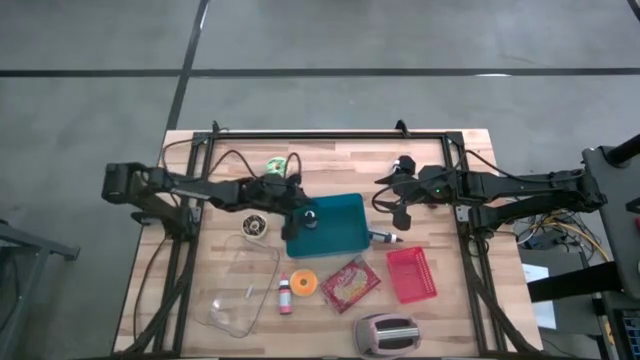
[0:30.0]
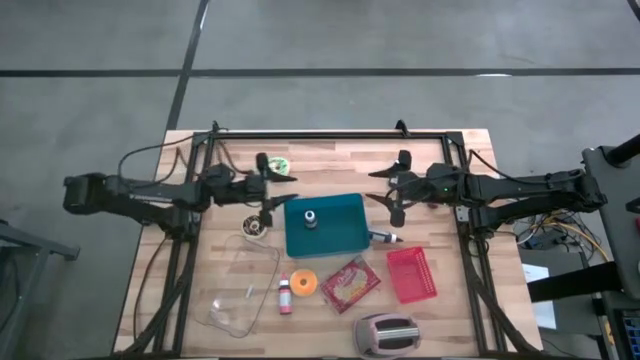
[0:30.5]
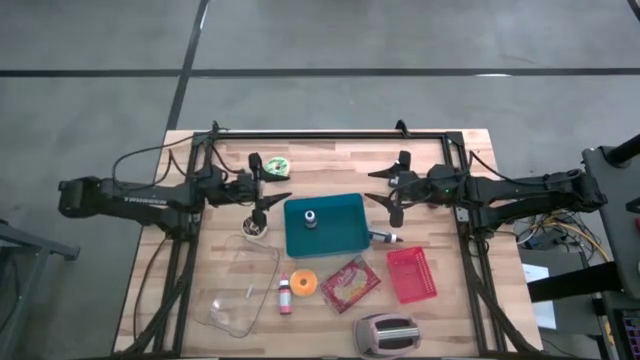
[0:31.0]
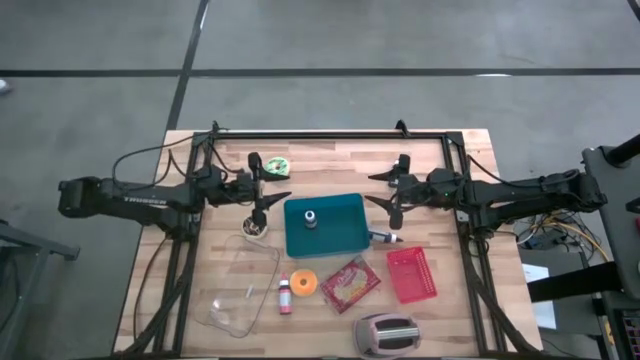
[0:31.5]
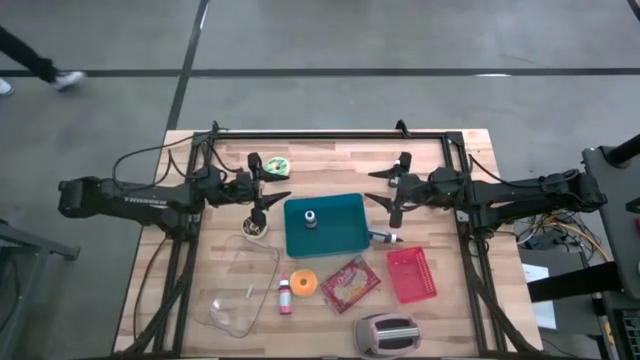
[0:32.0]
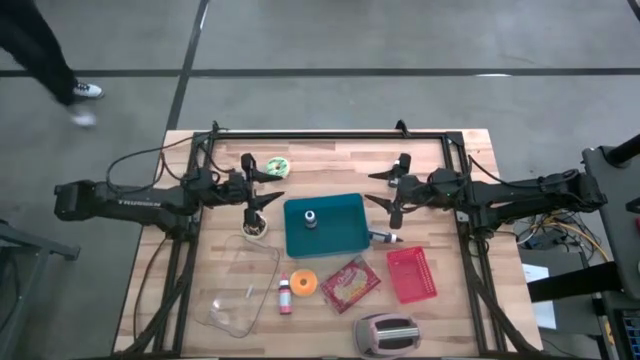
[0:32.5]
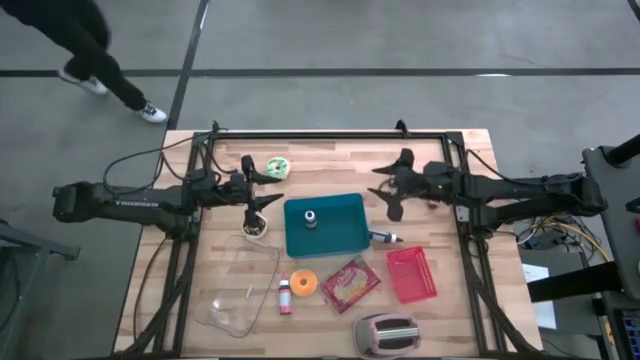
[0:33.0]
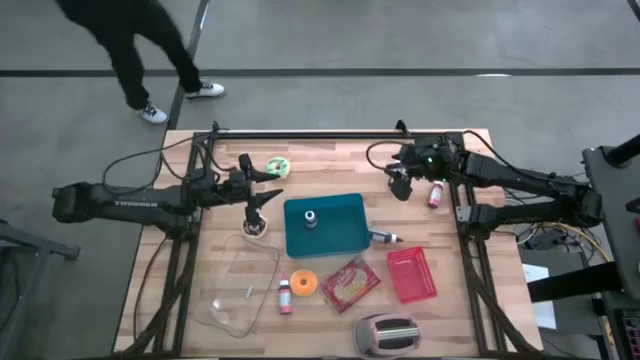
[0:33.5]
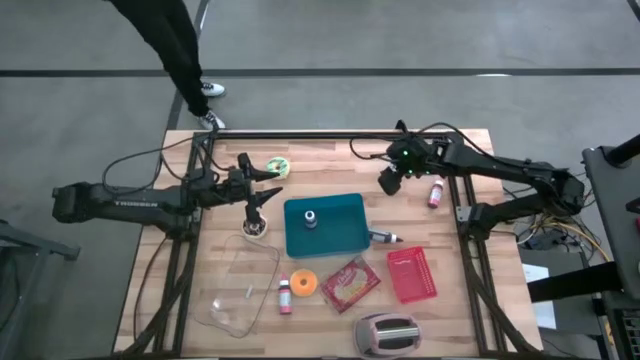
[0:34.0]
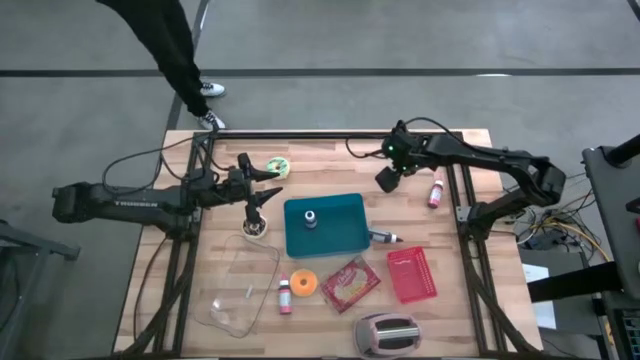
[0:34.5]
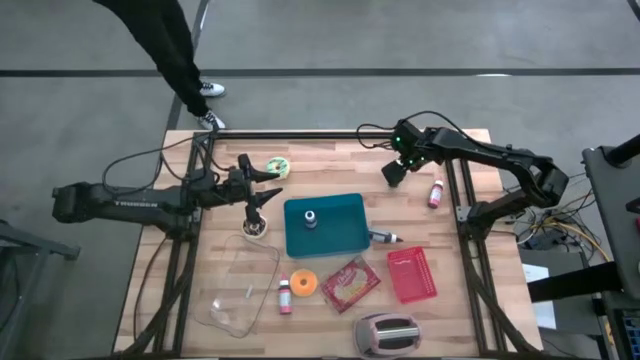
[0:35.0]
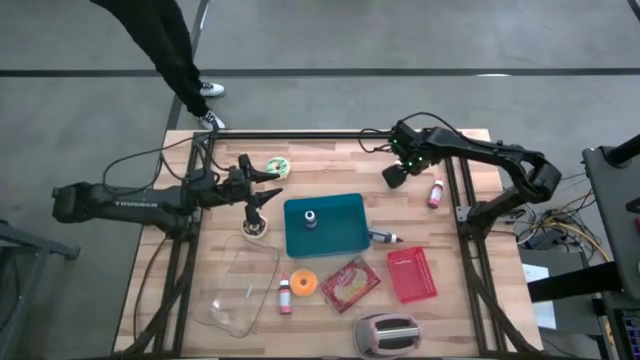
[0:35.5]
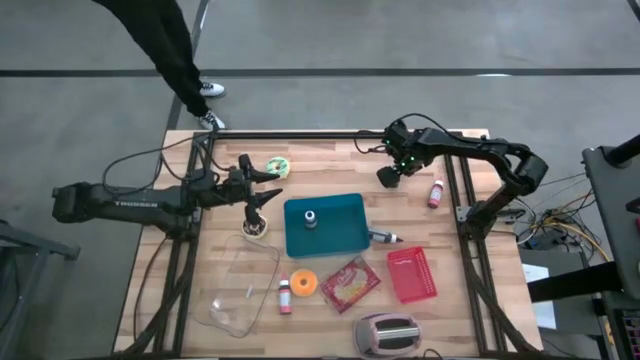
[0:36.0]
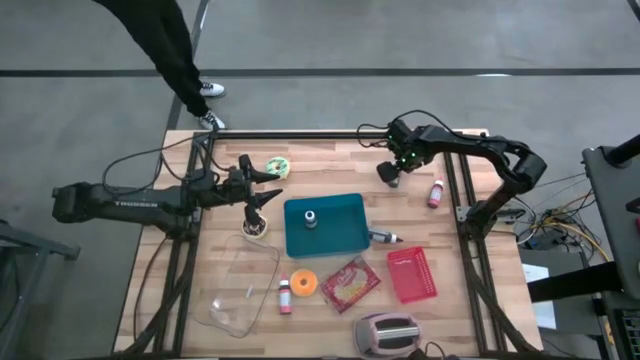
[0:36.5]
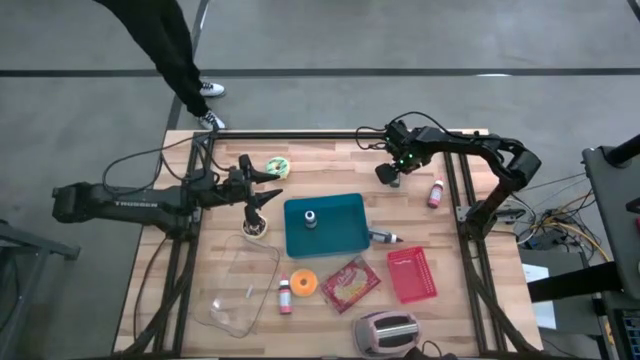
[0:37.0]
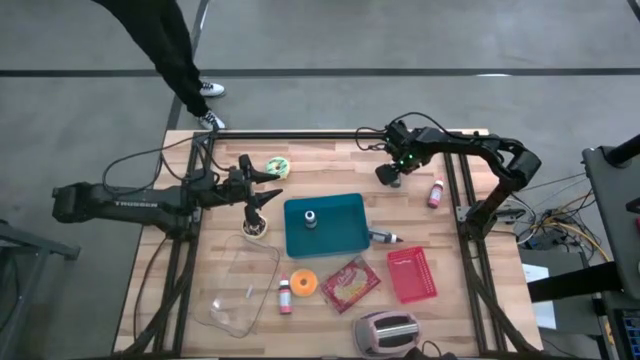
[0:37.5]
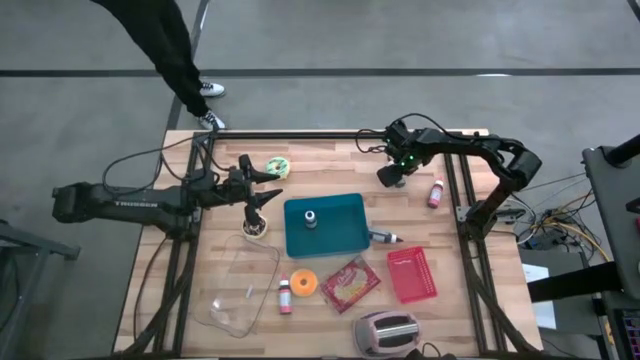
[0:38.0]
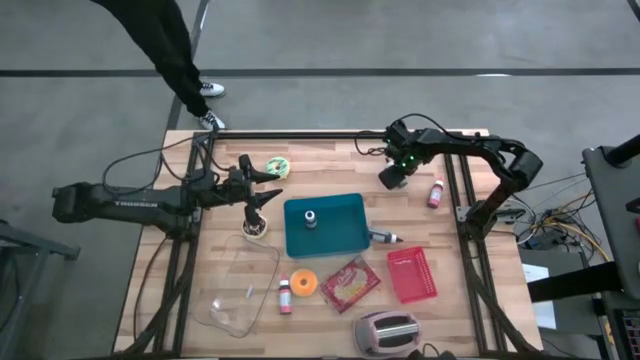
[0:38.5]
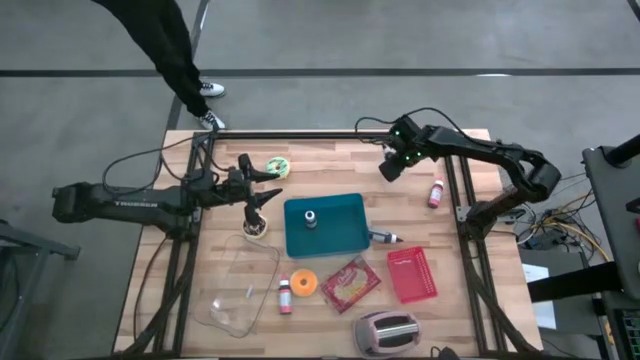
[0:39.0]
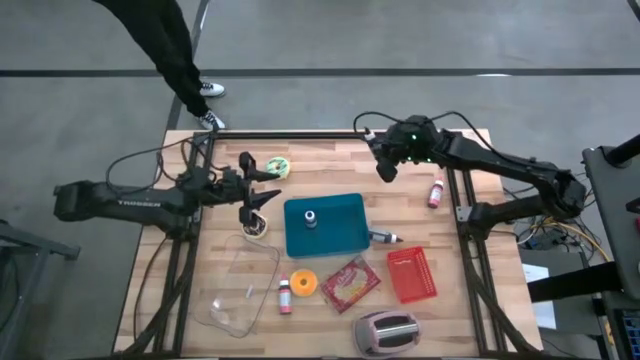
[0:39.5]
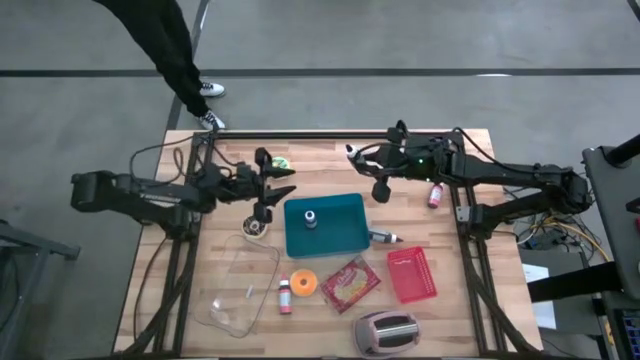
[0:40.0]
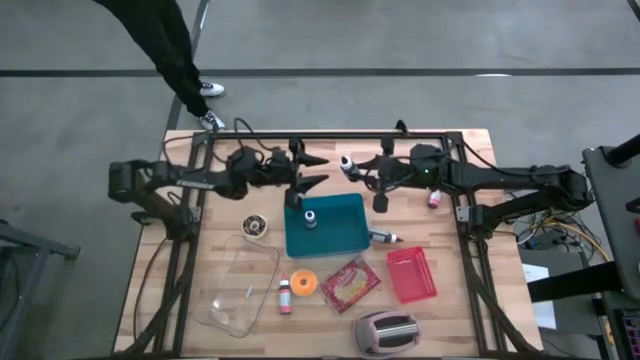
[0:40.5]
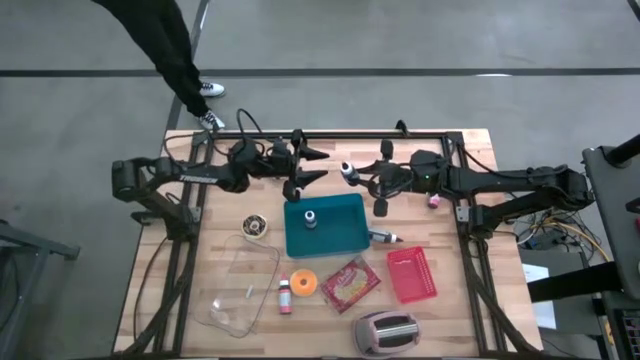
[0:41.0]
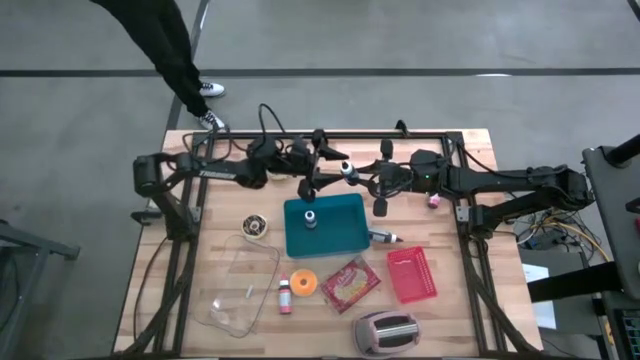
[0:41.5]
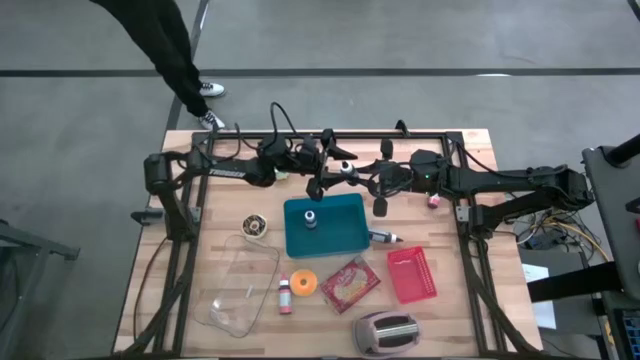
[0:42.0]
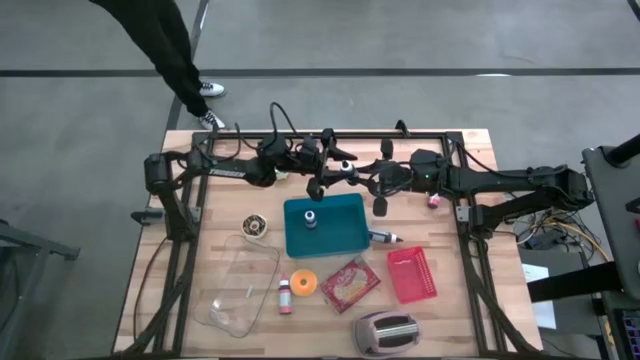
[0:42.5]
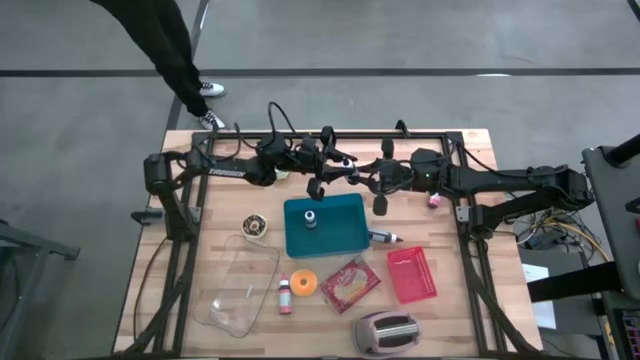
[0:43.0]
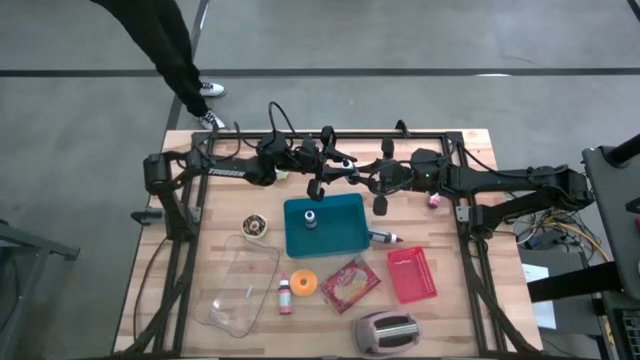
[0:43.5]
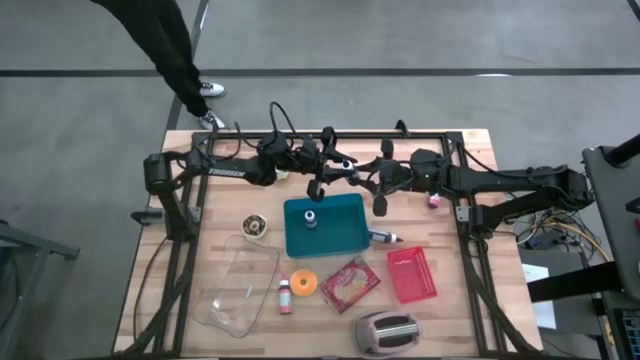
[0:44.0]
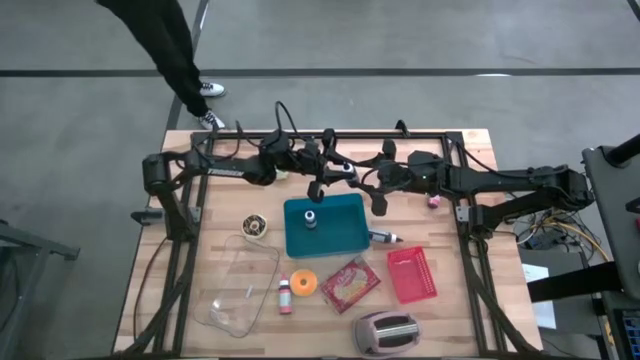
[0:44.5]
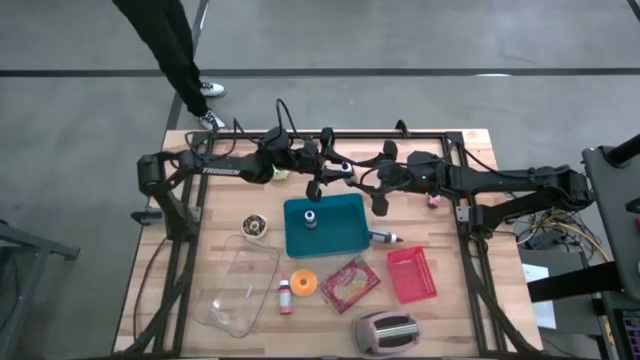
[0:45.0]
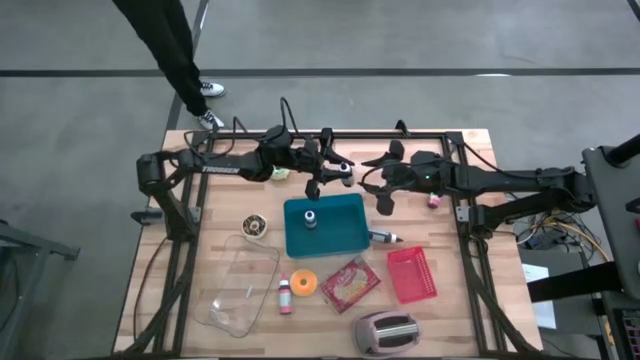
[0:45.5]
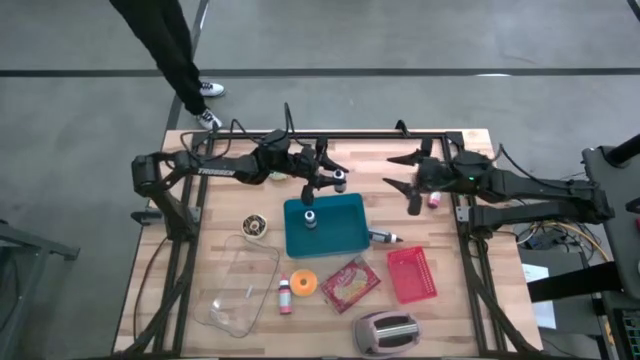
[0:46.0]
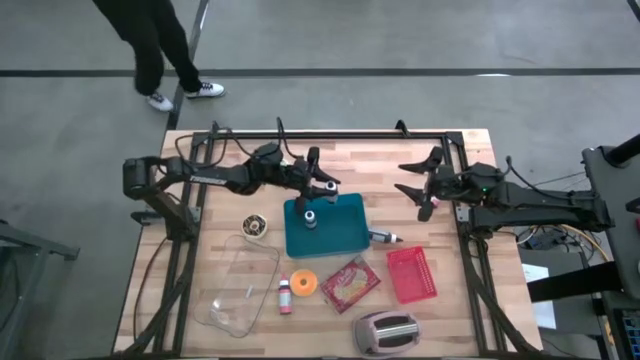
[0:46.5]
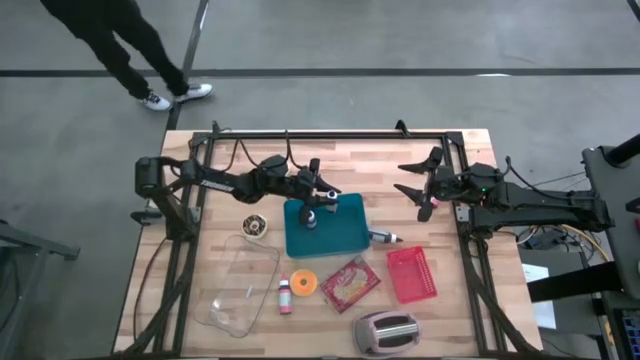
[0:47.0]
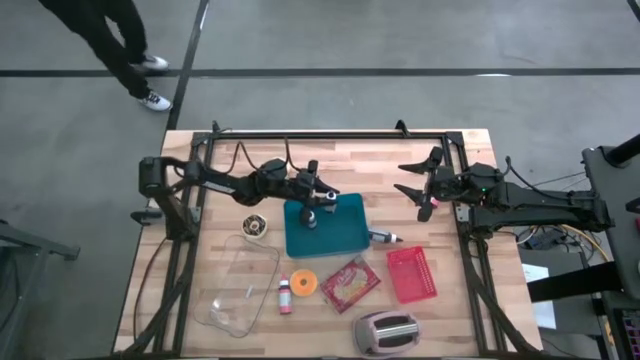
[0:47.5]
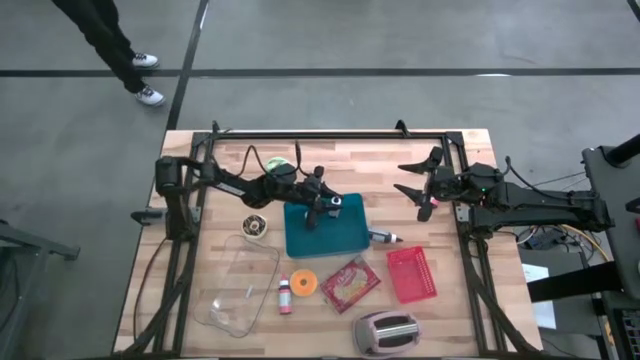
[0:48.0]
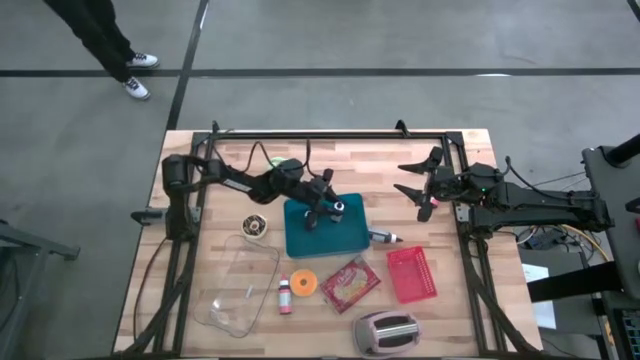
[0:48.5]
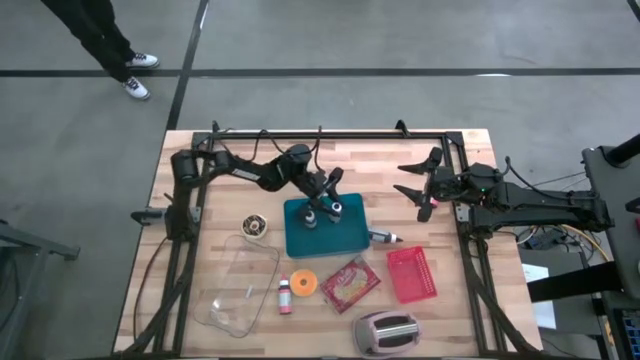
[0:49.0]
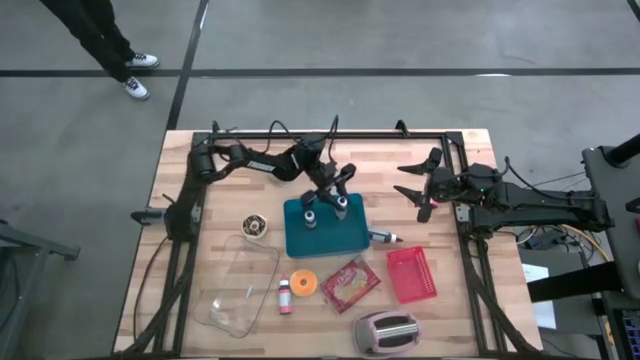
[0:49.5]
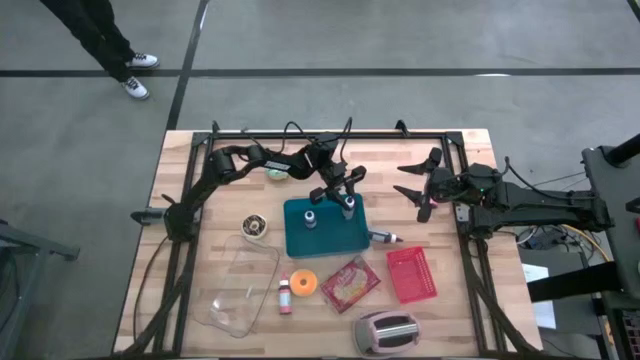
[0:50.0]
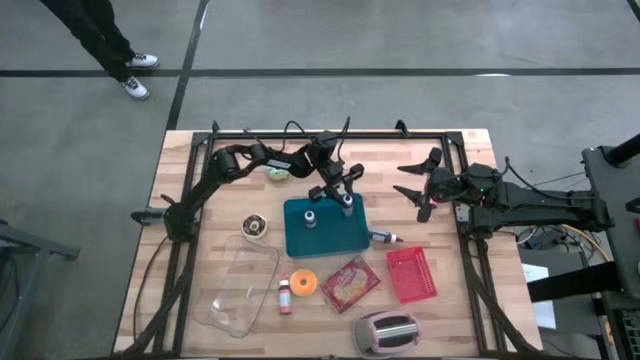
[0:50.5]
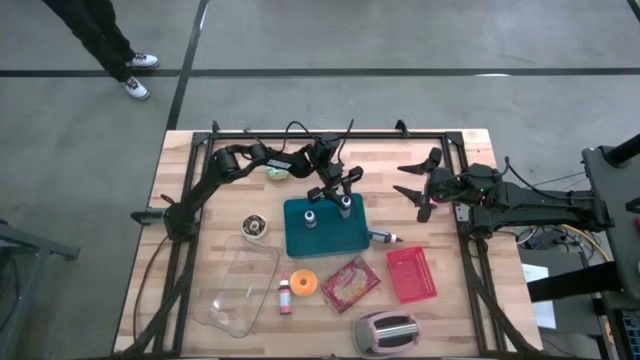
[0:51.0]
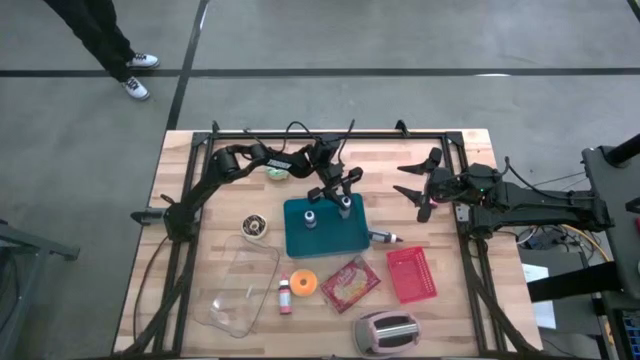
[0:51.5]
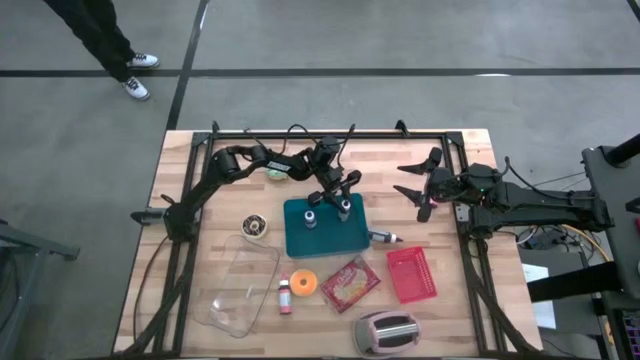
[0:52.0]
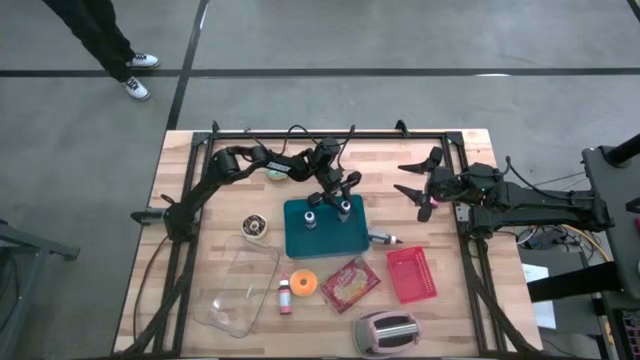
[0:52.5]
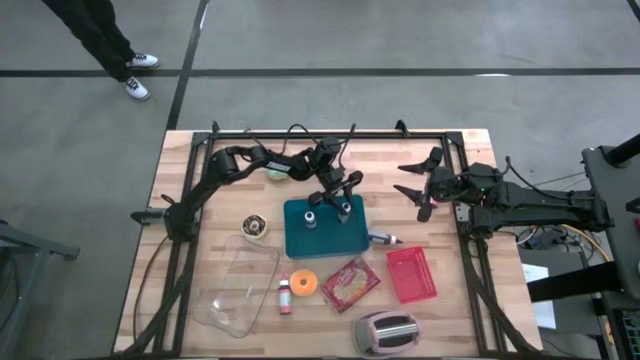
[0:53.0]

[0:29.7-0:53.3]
Task: Pick & Place Food Item
Put the top black food coloring bottle into the blue bin
